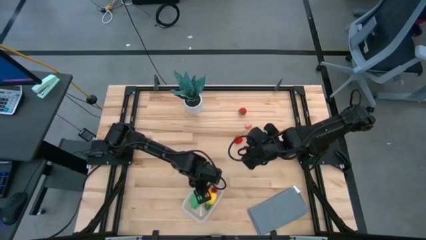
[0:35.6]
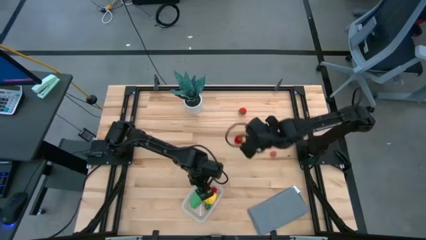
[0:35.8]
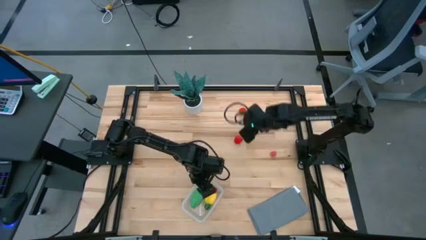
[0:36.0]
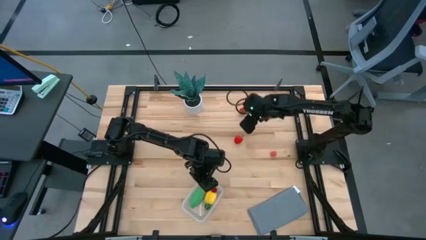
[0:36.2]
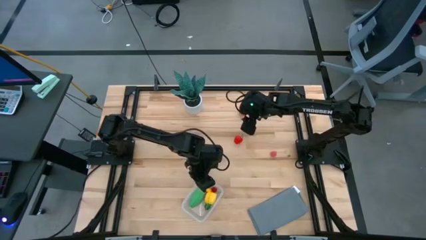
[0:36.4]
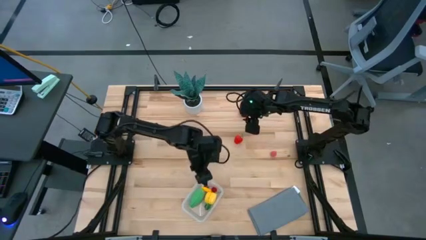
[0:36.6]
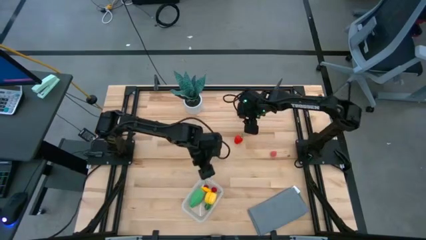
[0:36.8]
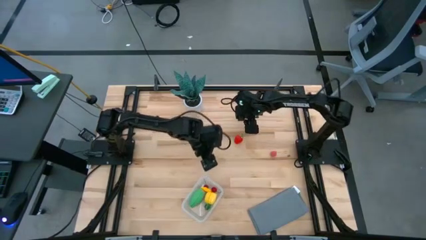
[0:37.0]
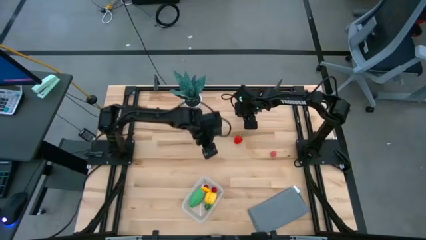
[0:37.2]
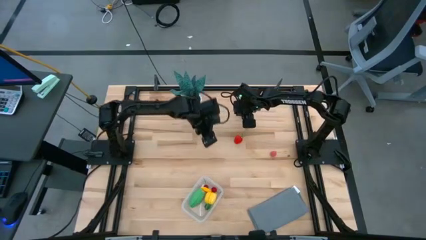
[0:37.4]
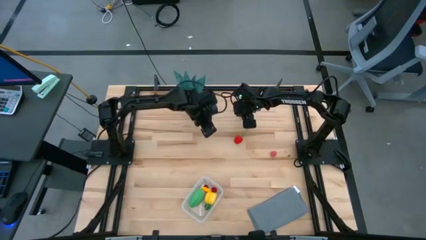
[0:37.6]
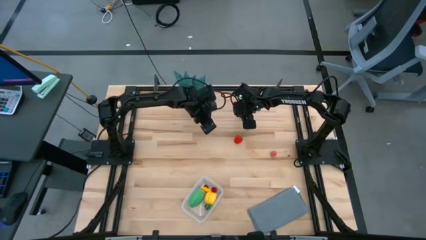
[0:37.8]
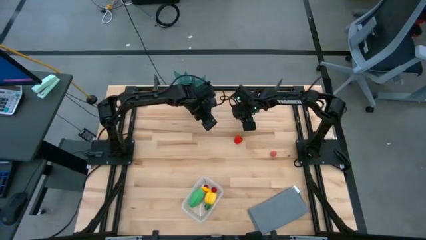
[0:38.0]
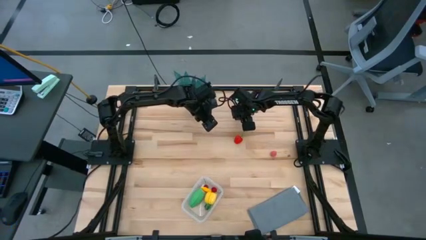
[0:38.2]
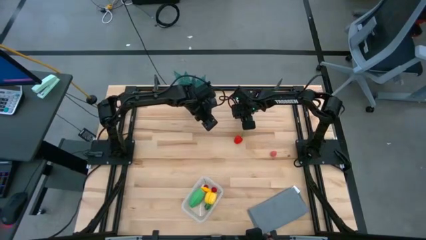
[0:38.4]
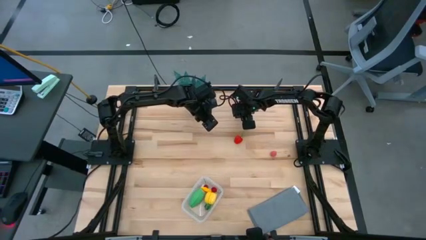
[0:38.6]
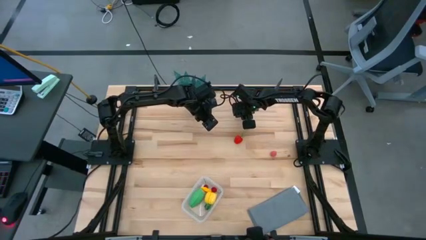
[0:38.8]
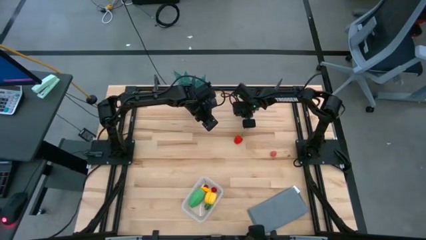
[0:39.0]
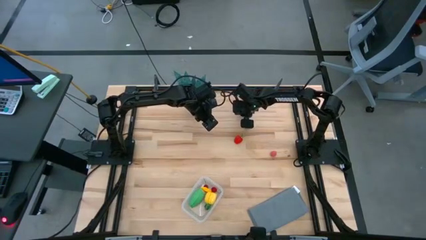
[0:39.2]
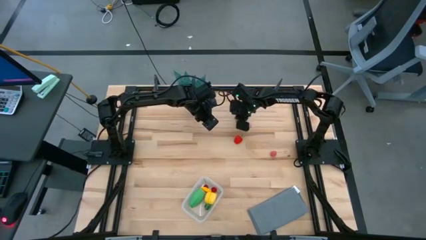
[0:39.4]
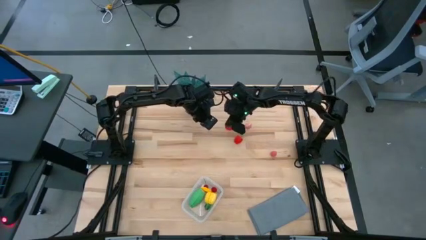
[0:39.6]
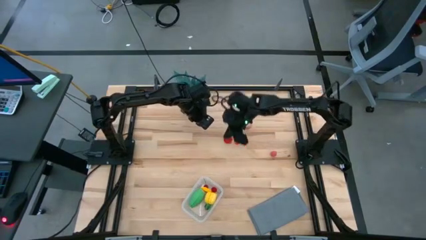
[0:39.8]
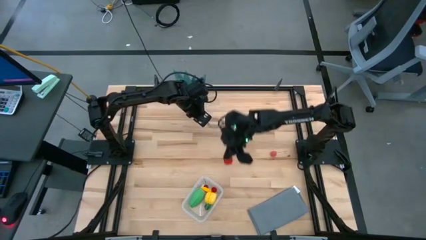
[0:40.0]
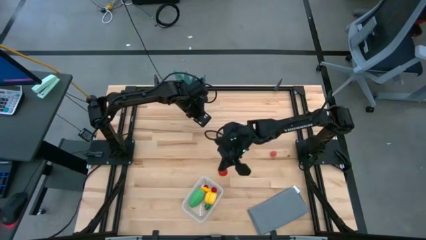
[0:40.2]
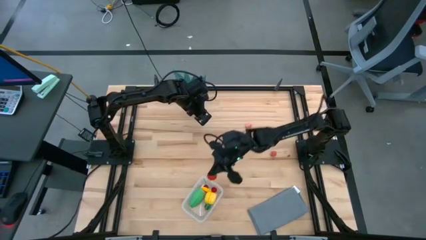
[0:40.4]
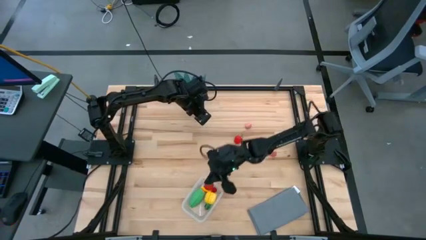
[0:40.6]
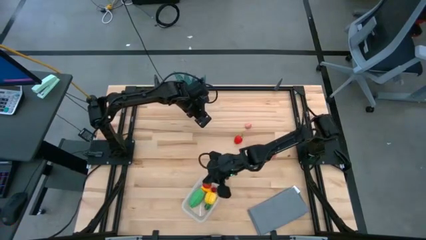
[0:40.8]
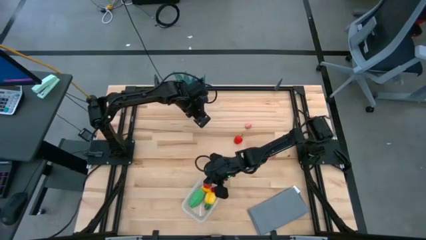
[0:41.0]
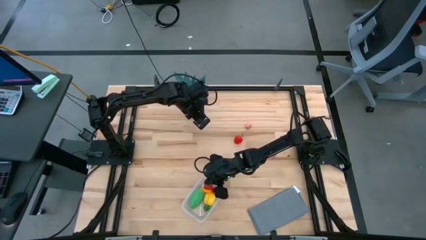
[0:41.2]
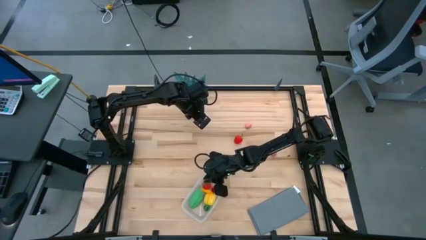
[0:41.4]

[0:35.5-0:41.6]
Task: Pick and placing Produce into tupperware
Put the top red strawberry into the transparent bin

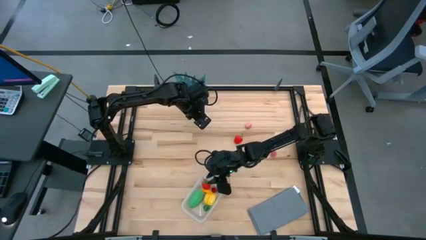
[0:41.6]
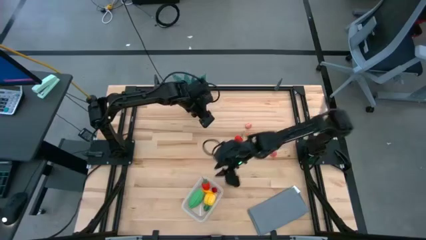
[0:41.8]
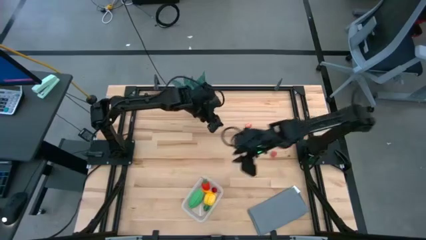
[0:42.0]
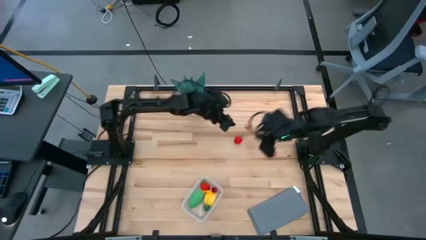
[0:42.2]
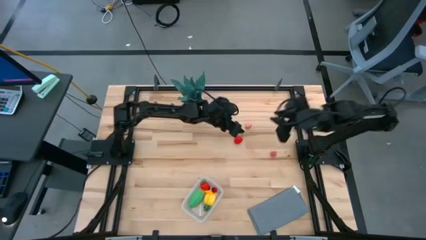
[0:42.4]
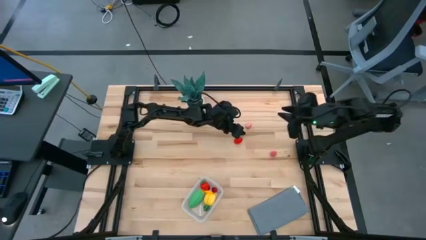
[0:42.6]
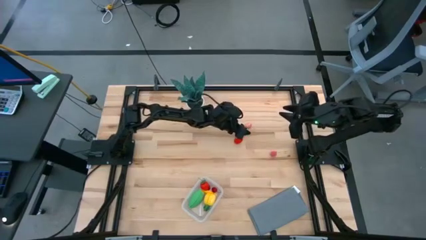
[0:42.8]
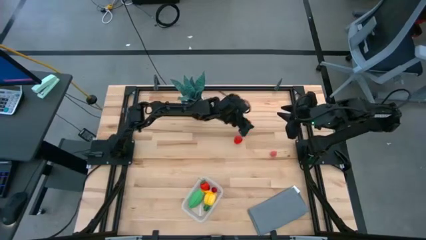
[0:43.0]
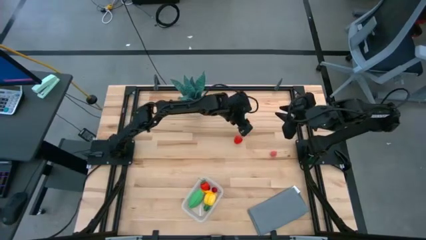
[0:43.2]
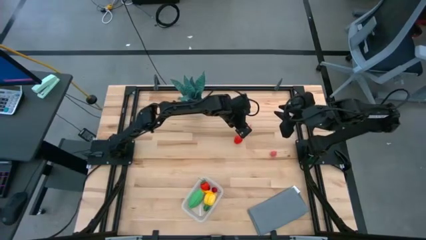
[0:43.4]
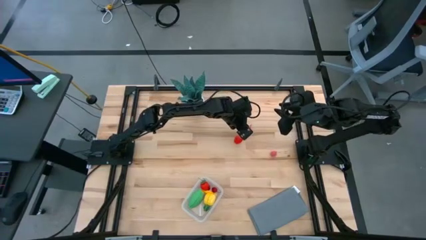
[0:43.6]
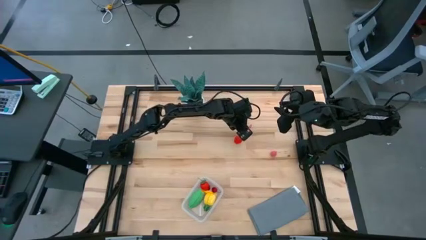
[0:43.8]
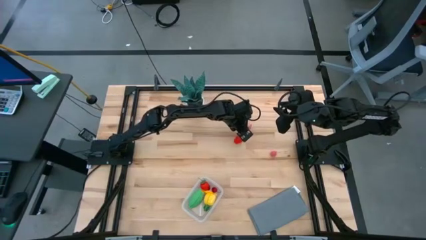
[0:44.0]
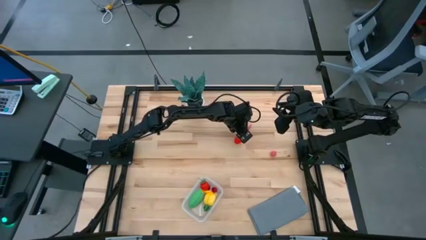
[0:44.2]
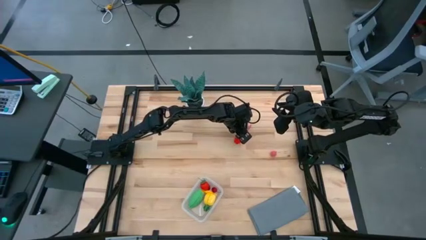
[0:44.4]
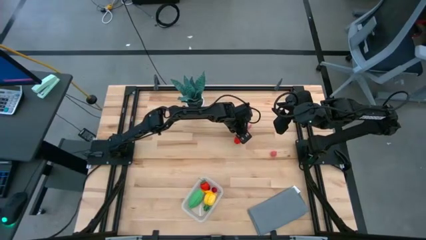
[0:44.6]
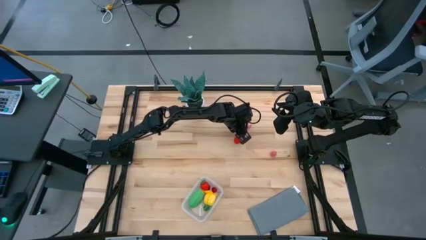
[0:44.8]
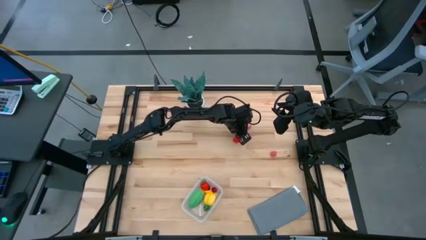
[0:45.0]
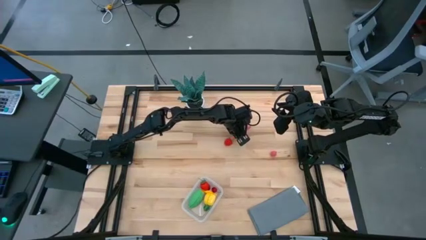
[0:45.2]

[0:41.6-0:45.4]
Put the red strawberry into the transparent bin

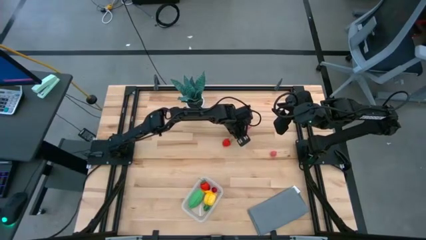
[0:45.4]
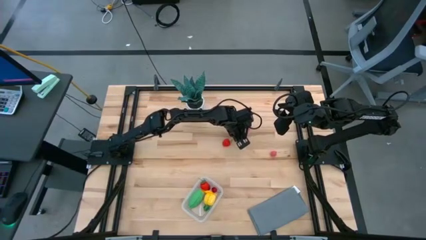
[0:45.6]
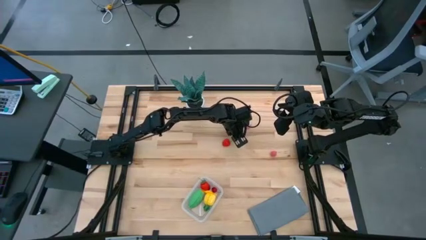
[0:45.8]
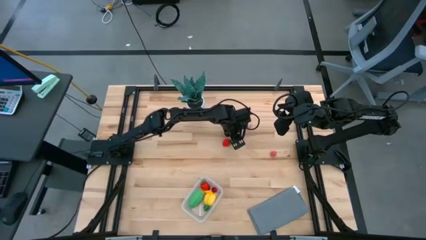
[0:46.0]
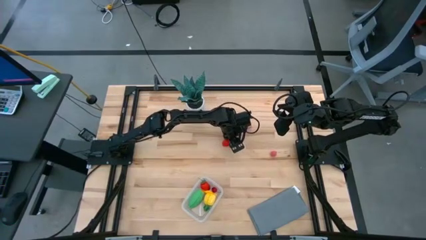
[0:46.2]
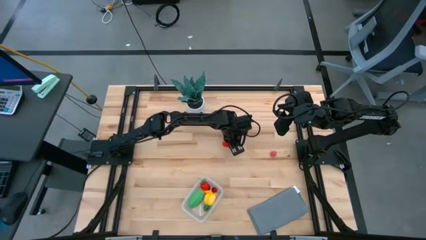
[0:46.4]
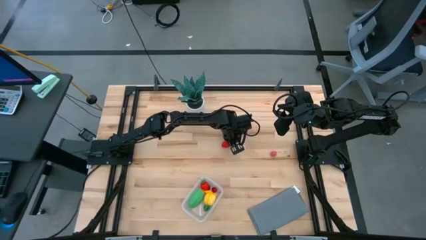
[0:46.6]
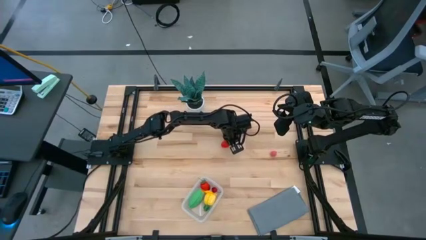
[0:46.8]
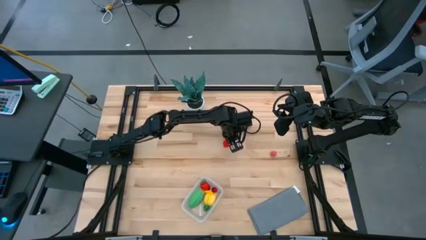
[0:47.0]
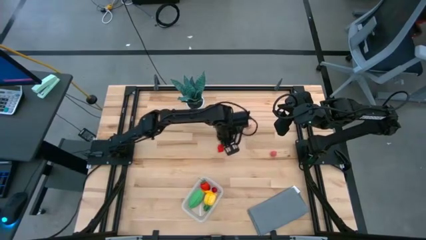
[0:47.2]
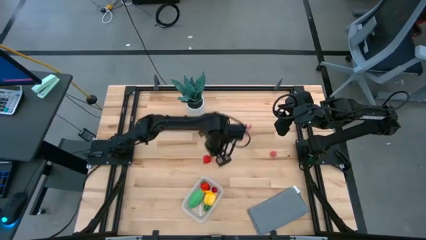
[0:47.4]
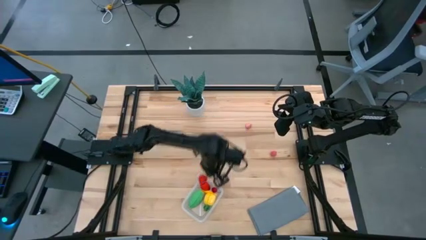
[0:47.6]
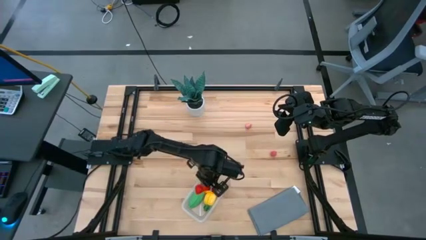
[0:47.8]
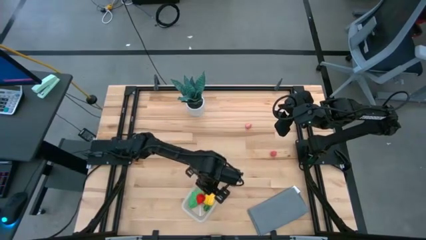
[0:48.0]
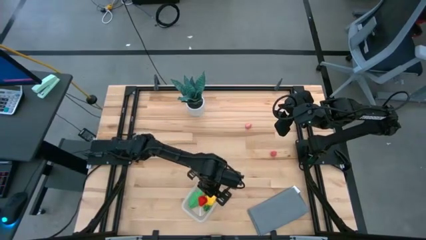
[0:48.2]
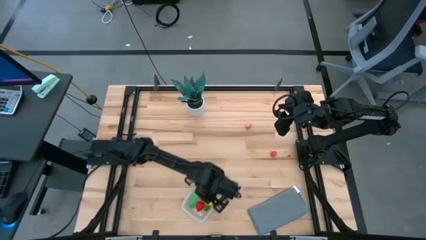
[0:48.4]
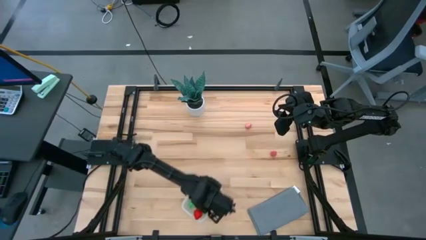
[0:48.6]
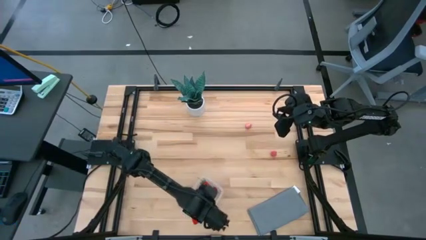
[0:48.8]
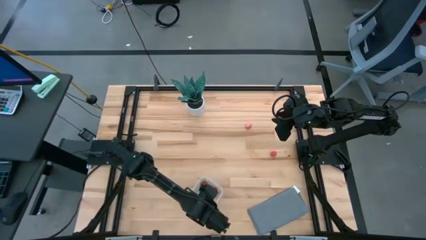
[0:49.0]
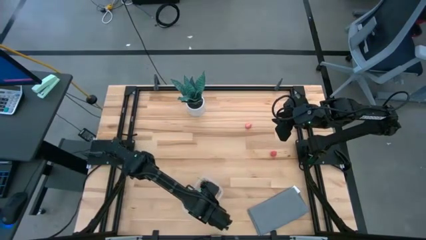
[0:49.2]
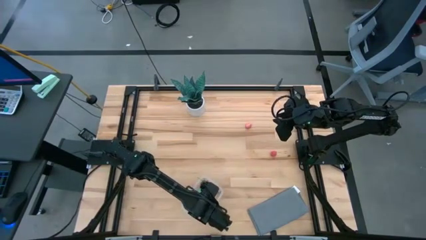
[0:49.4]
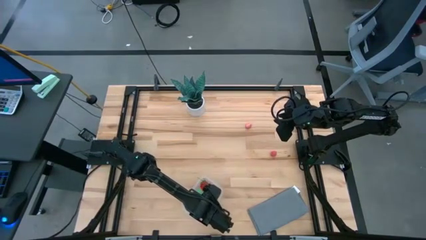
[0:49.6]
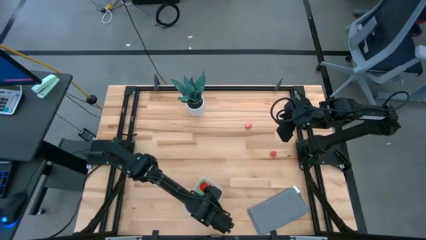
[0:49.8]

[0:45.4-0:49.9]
Put the red strawberry into the transparent bin

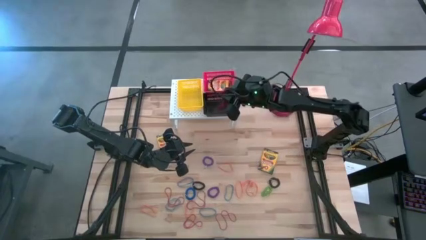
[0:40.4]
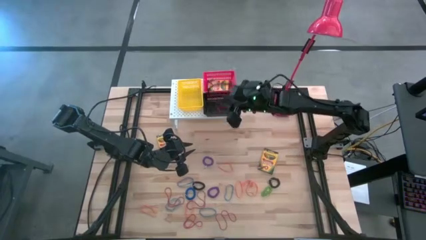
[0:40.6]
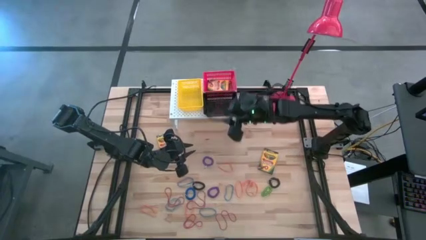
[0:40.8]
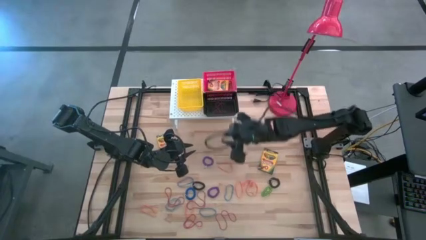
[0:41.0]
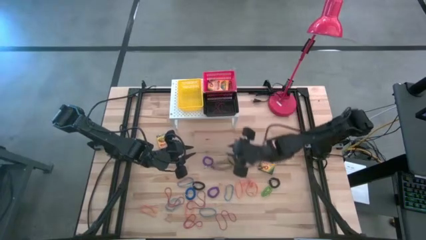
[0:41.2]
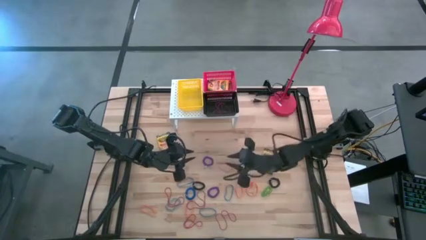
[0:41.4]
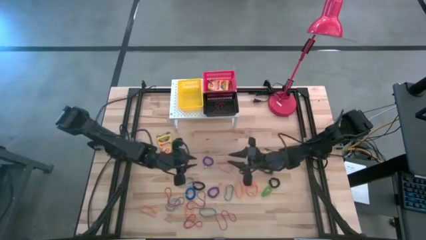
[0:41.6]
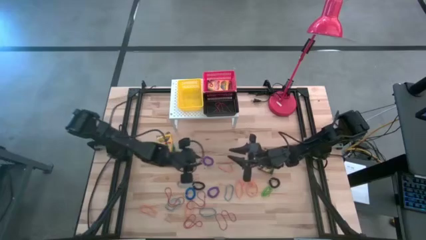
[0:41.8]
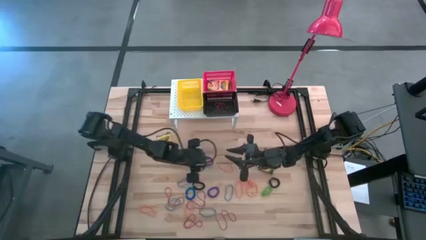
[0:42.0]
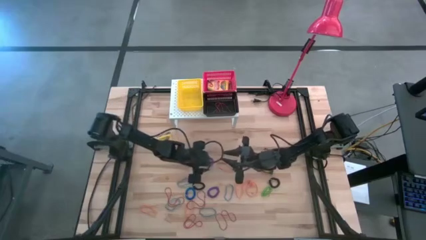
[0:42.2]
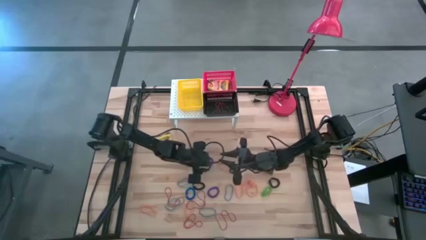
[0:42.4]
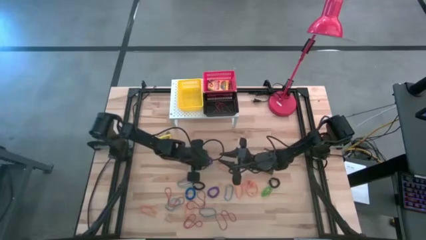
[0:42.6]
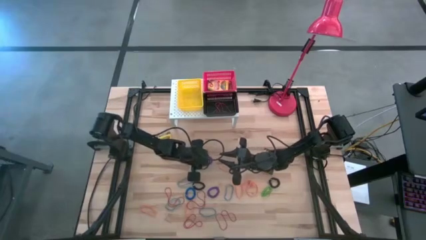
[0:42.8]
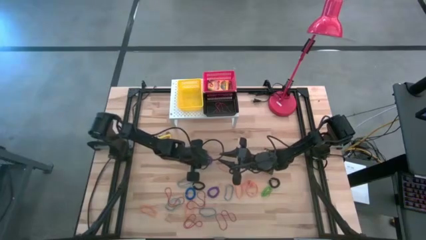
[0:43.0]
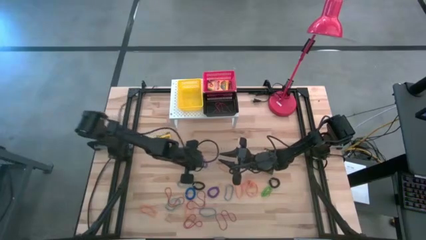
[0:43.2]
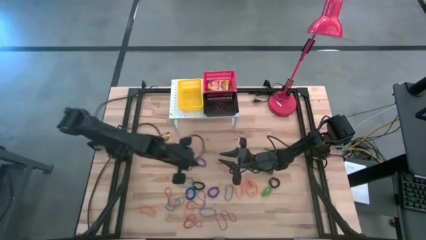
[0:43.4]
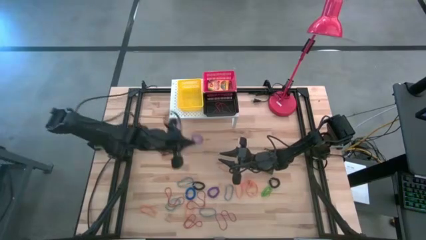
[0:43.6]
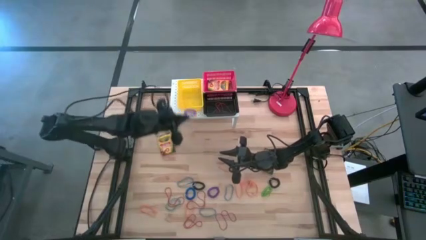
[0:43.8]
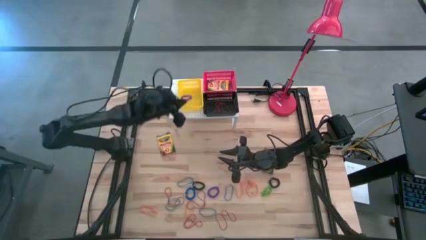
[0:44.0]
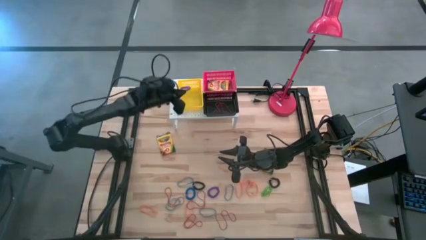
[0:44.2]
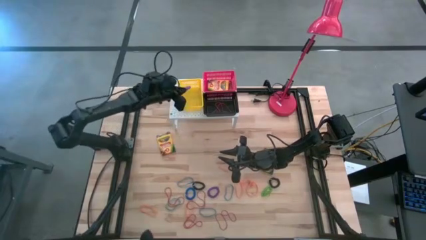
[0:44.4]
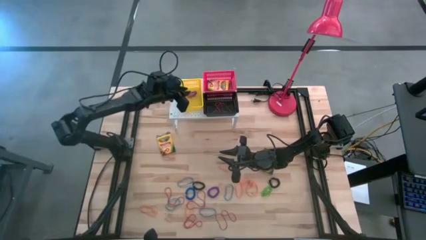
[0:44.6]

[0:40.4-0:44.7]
Task: Pick & Place Office Desk Supplies
Put the purple spring keychain into the yellow bin on the shelf
